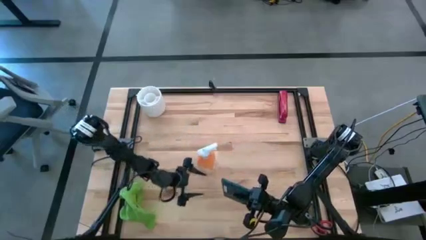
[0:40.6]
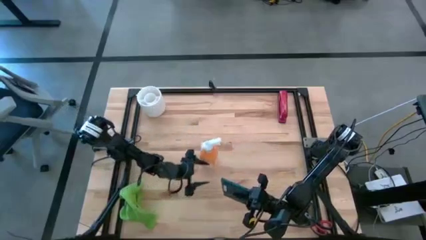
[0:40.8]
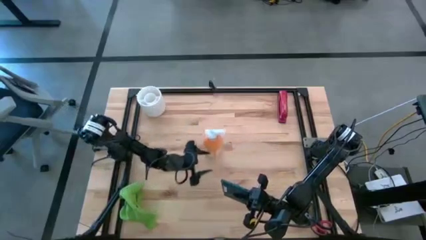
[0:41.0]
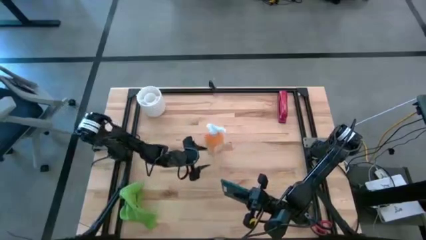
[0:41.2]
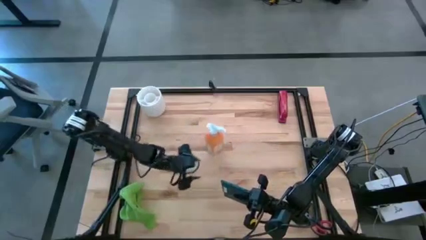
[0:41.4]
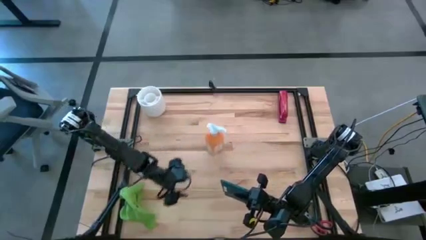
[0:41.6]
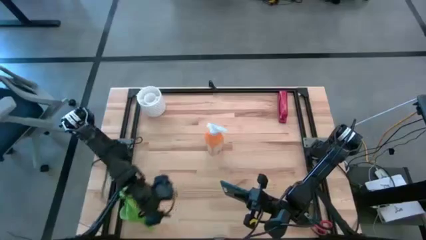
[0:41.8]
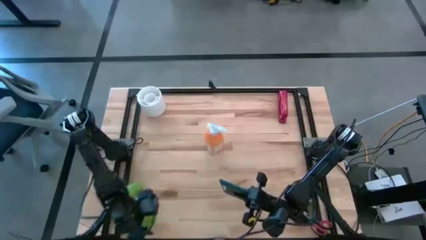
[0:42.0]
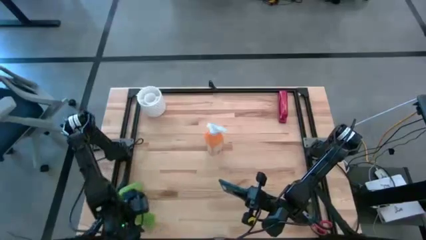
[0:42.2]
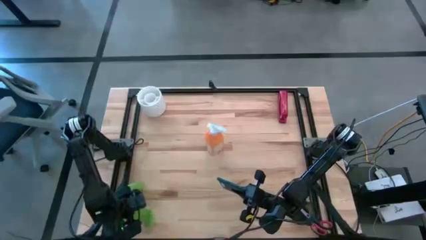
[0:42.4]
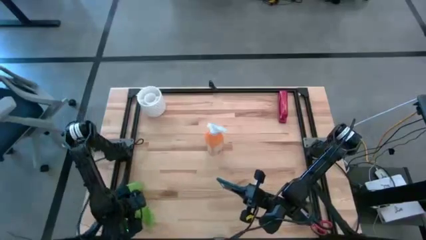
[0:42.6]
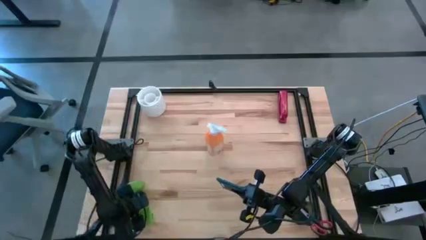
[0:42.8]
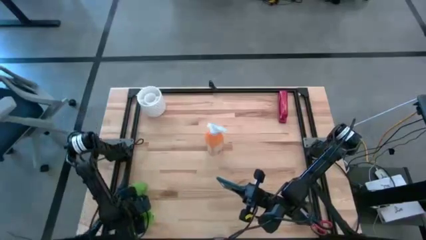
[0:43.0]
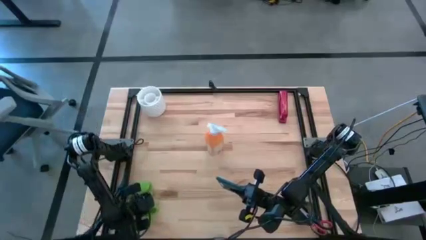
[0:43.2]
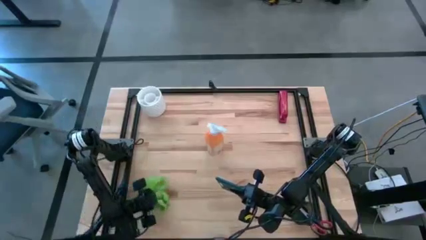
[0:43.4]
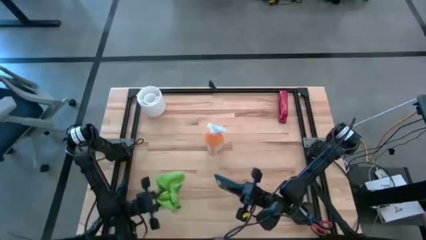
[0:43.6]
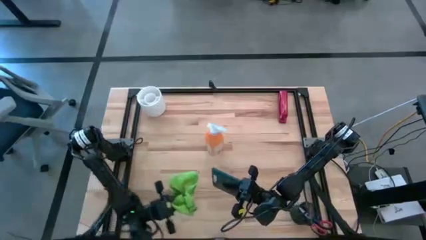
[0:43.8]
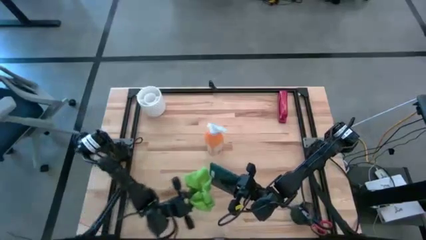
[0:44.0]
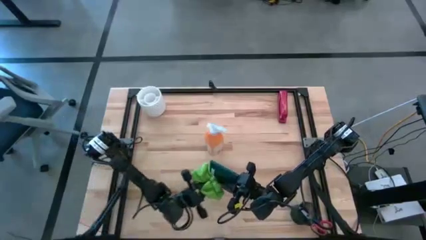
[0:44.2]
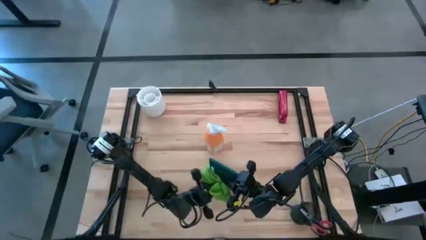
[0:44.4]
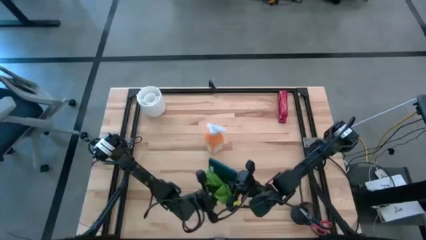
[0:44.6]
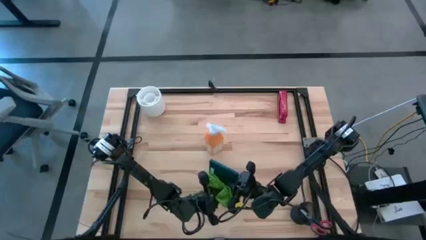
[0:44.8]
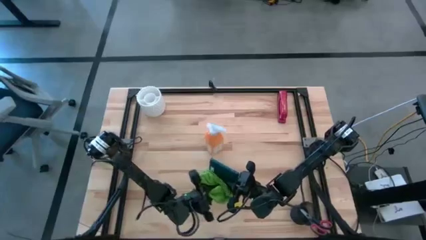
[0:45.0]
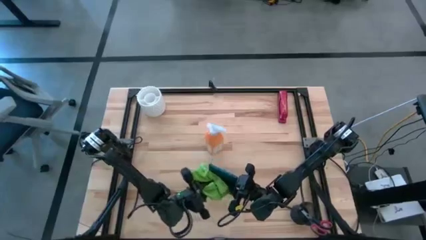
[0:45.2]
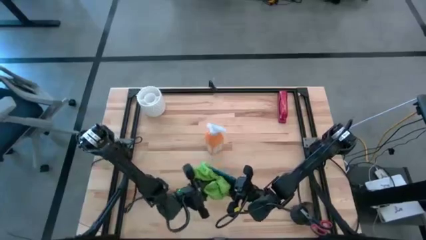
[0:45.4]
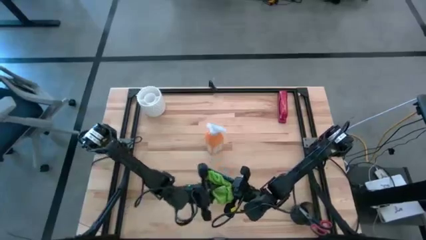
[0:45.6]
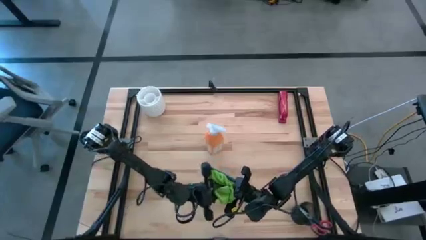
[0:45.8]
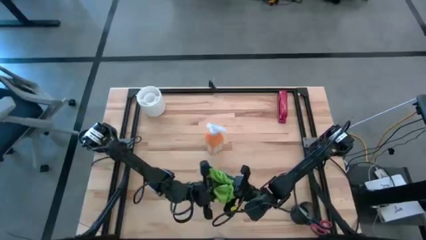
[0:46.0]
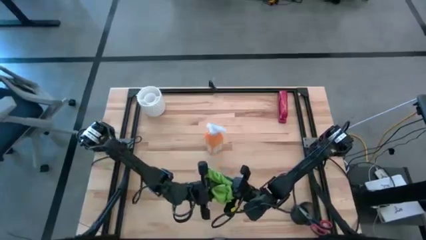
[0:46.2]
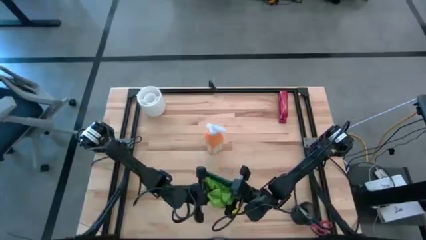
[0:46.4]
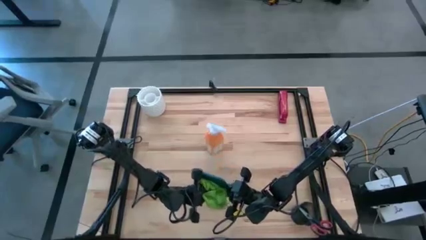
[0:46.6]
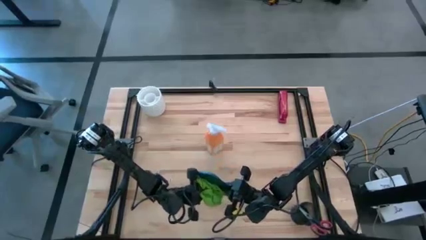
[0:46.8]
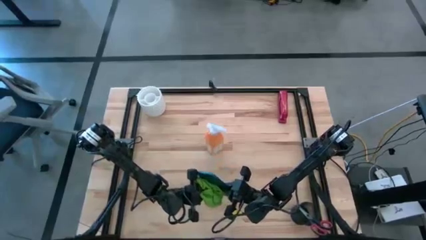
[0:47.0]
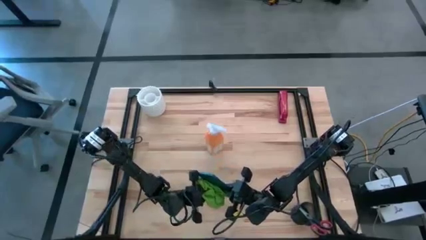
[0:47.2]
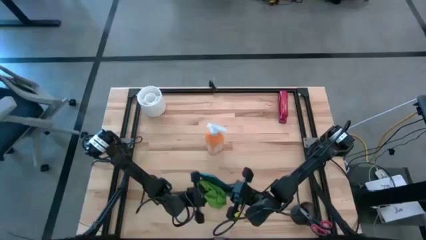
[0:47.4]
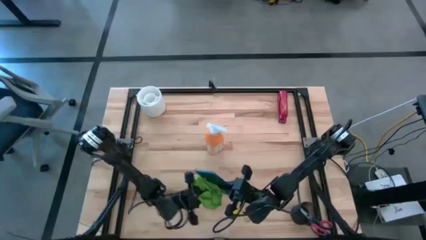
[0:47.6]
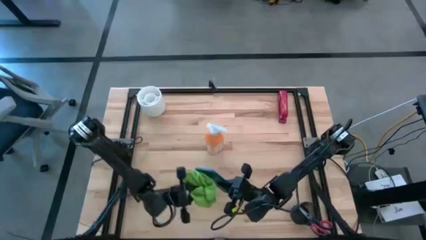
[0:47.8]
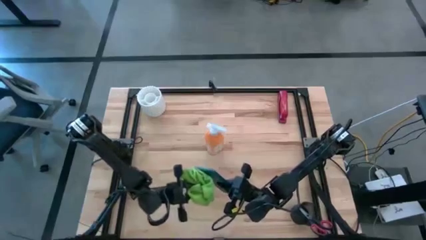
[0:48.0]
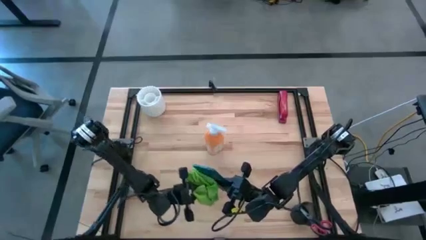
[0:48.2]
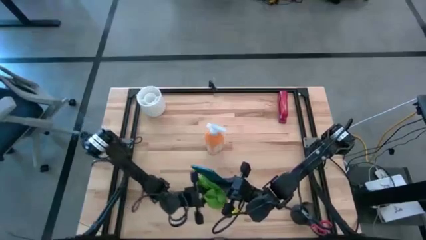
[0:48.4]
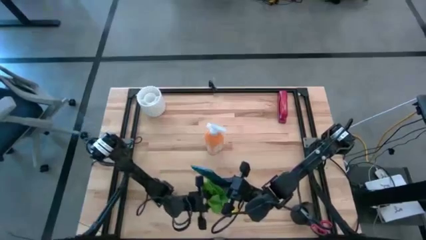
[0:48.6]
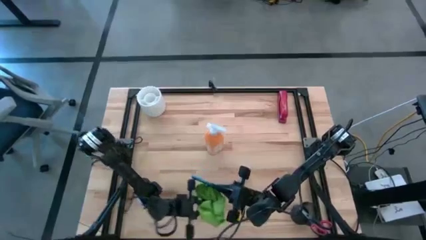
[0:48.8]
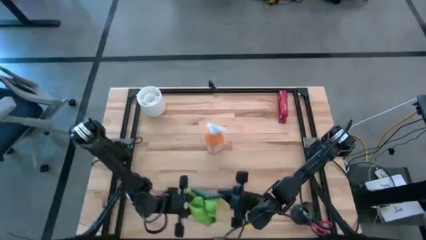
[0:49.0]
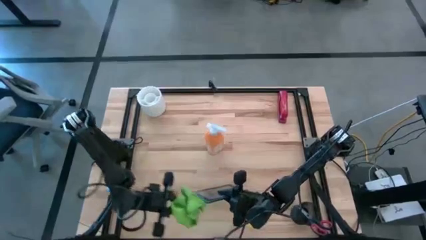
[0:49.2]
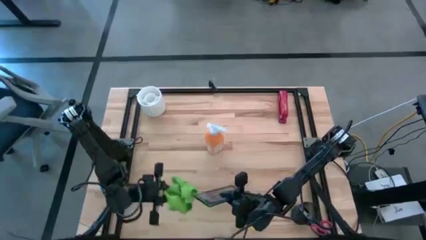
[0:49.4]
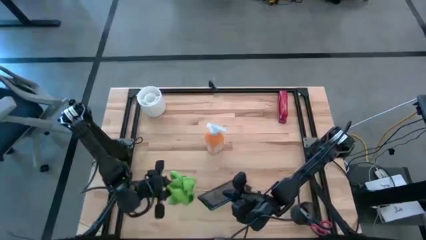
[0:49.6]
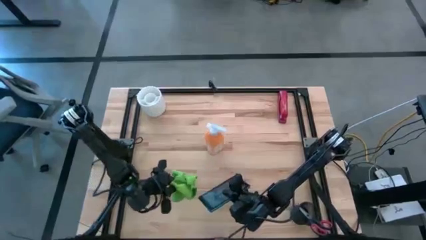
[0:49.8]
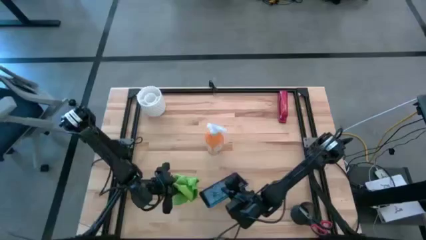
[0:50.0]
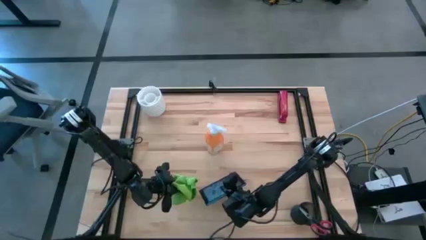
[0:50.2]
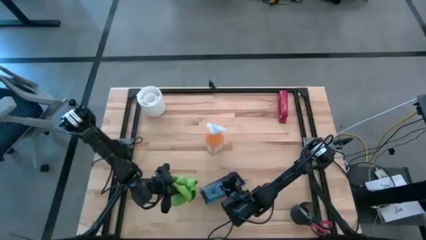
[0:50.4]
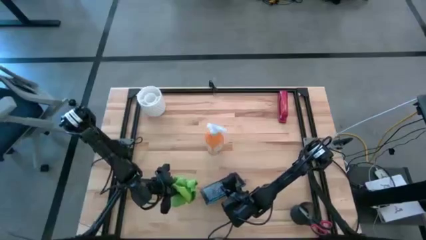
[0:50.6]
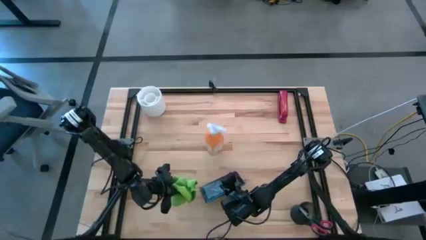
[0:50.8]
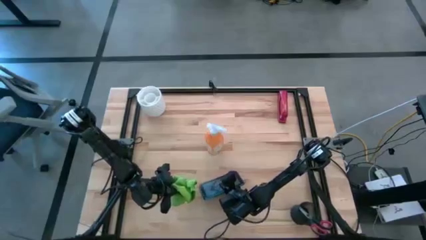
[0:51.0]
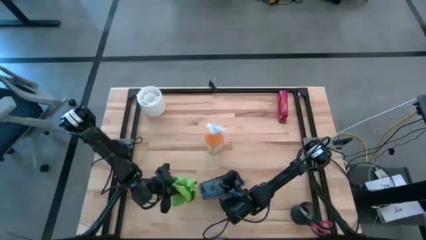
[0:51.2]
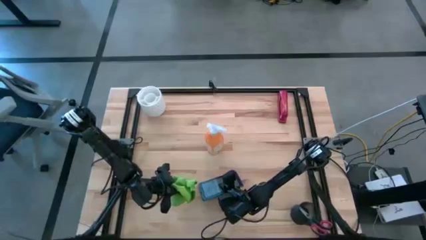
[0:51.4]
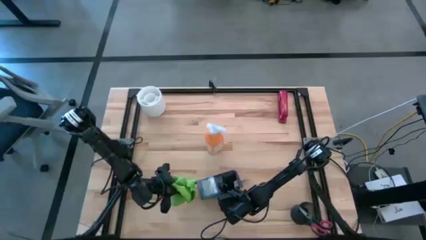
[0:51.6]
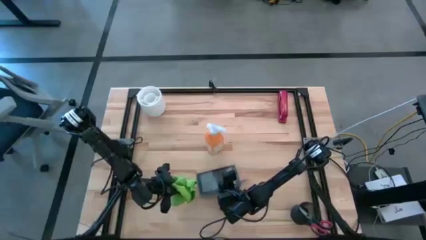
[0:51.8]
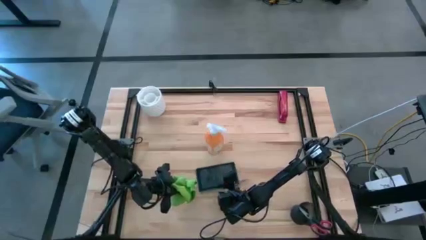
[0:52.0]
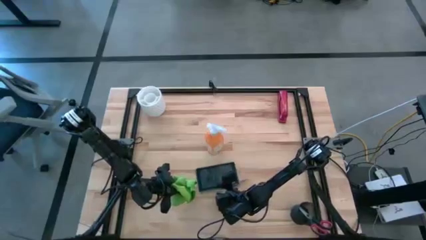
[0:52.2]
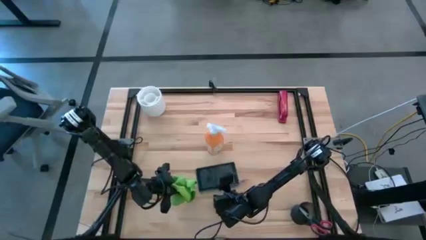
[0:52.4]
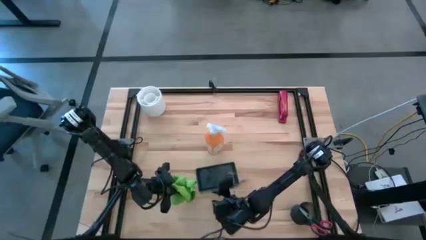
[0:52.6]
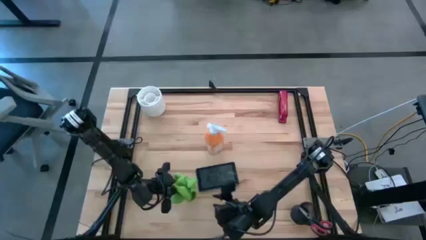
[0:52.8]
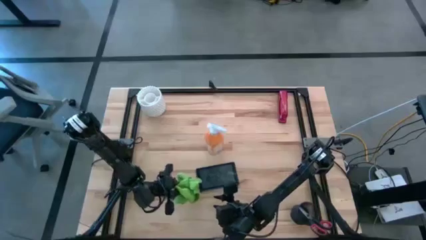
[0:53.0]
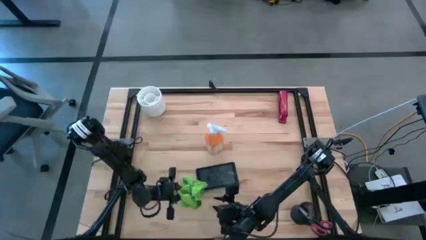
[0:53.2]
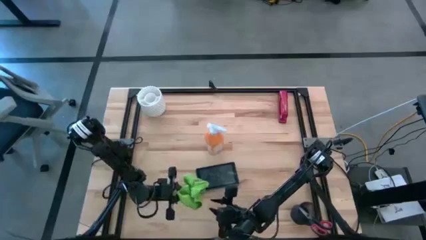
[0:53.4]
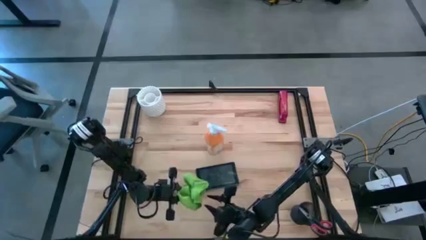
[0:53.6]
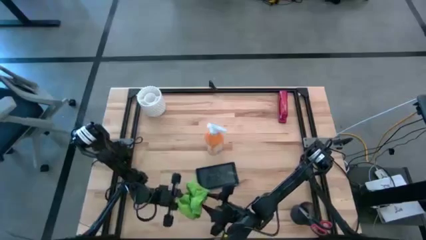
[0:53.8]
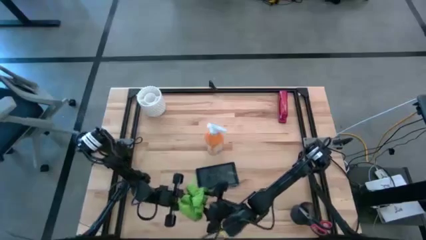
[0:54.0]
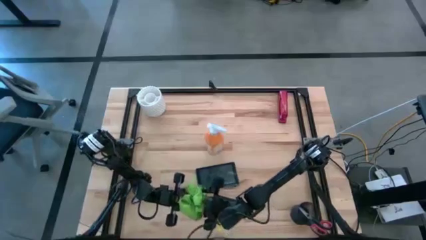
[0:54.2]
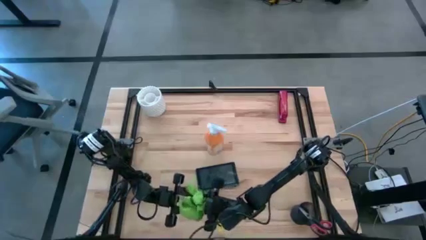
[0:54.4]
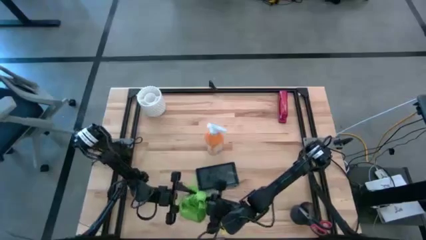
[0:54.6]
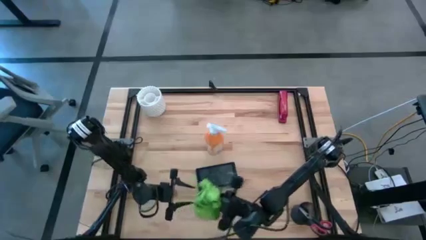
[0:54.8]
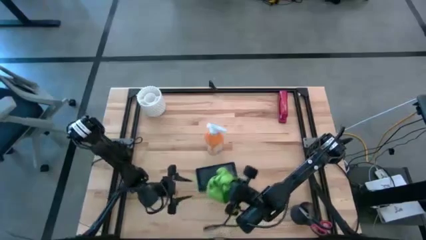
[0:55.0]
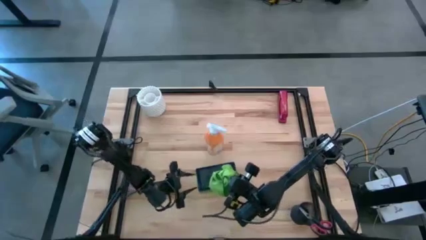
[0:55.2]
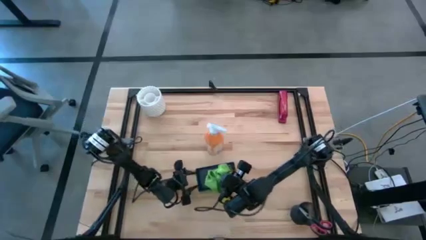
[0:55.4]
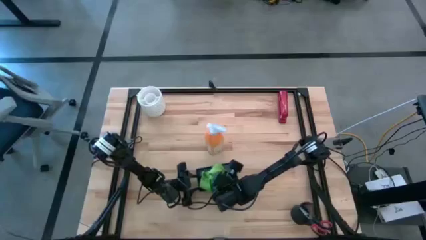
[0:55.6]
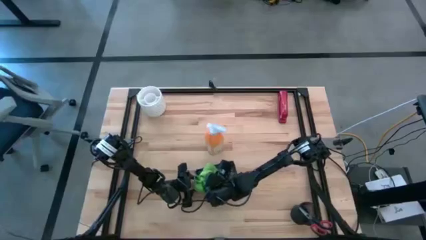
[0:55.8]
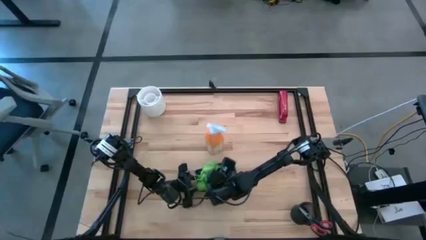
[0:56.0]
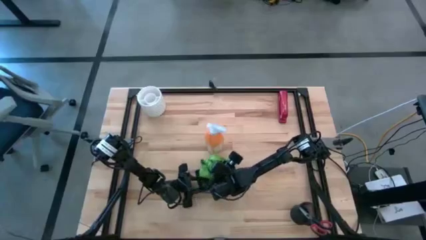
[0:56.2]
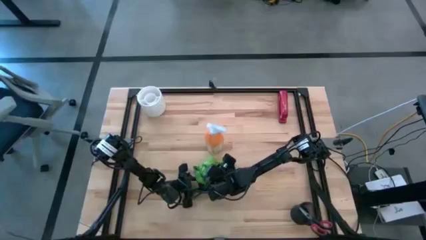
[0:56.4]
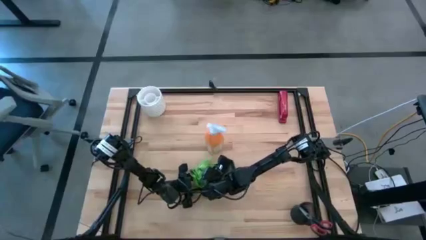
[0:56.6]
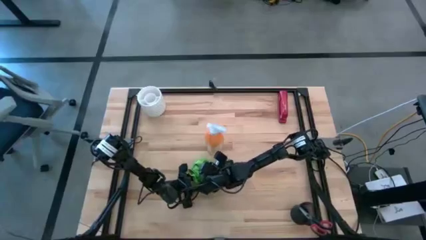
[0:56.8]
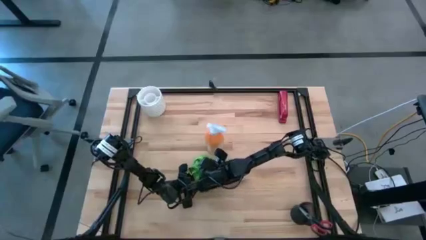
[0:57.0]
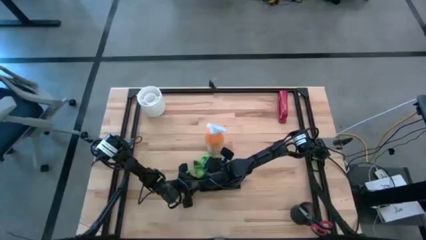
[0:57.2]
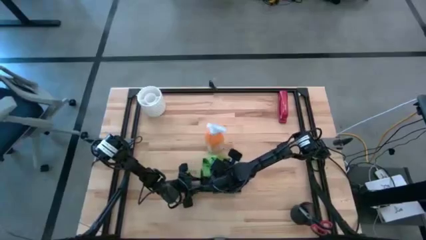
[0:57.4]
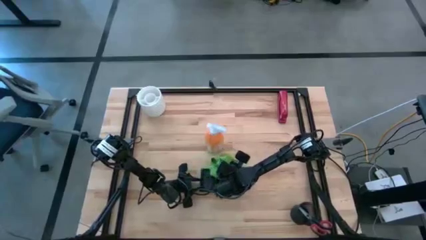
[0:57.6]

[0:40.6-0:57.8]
Task: Apply microfiber cloth
Wipe the blue tablet with the green microfiber cloth
